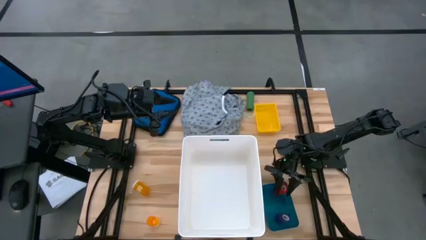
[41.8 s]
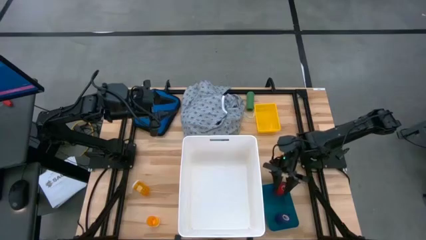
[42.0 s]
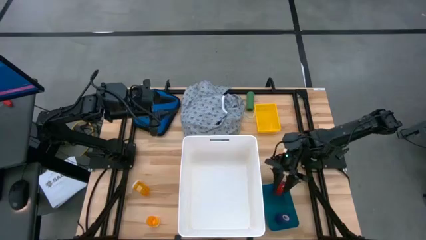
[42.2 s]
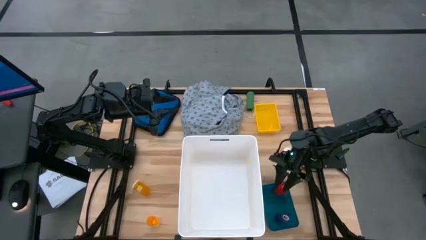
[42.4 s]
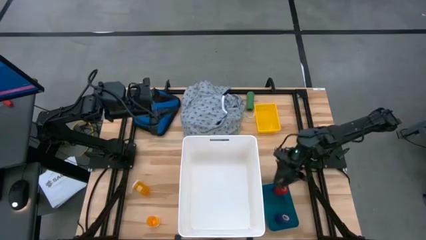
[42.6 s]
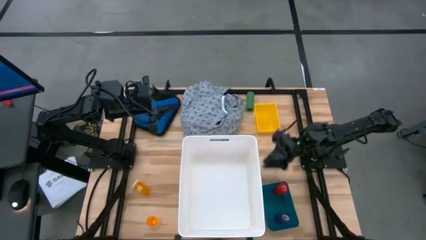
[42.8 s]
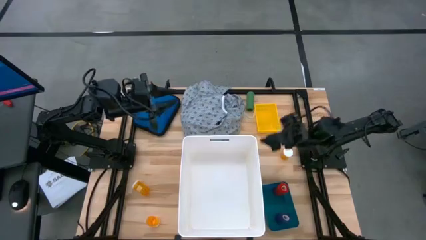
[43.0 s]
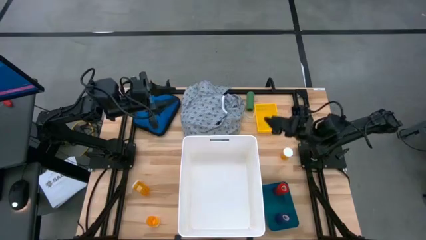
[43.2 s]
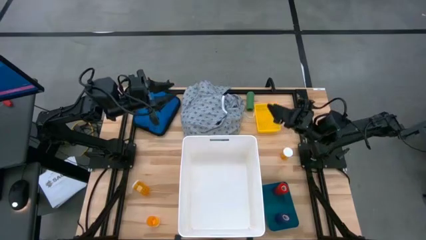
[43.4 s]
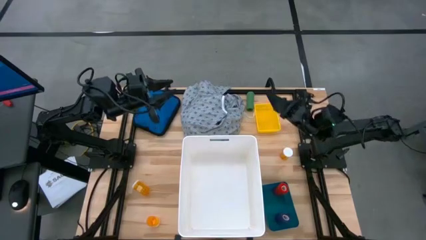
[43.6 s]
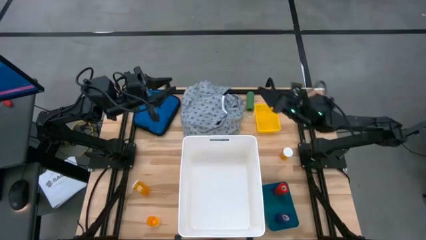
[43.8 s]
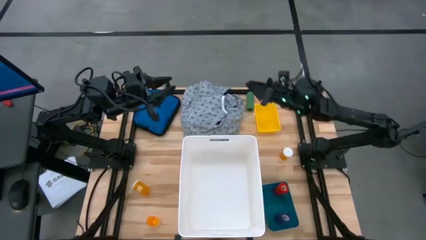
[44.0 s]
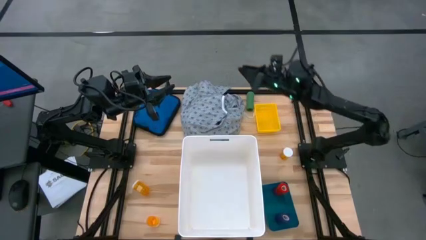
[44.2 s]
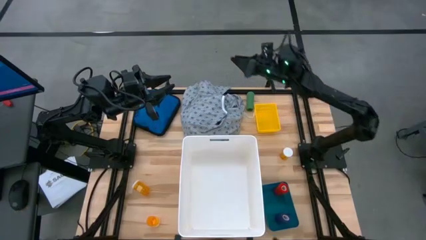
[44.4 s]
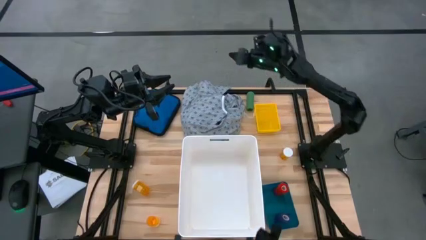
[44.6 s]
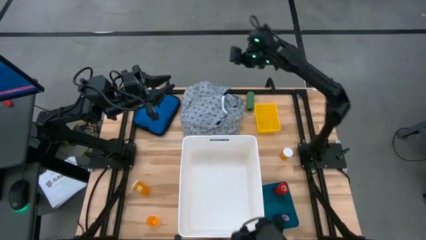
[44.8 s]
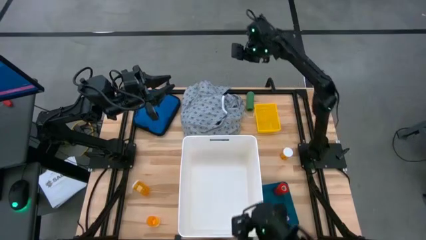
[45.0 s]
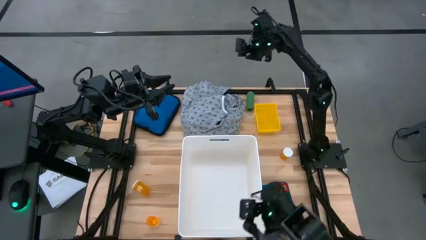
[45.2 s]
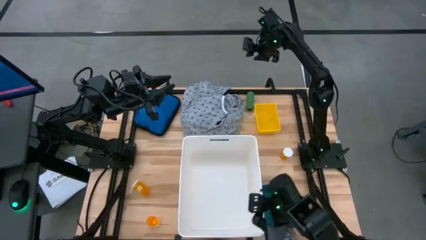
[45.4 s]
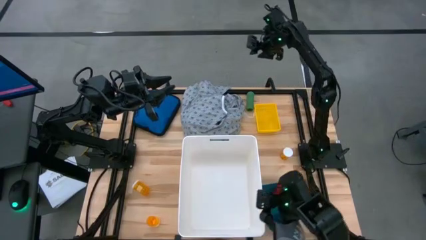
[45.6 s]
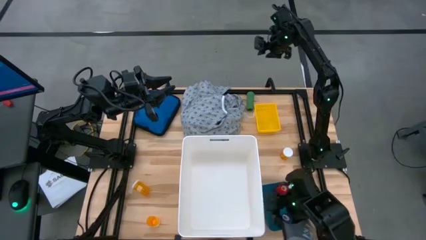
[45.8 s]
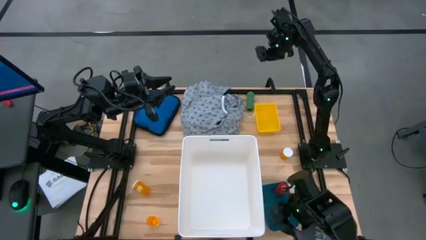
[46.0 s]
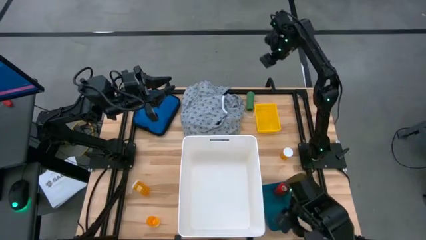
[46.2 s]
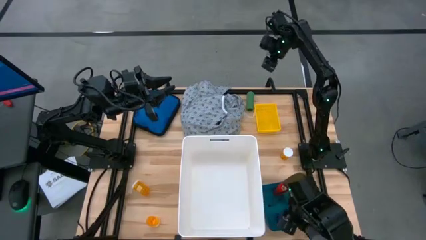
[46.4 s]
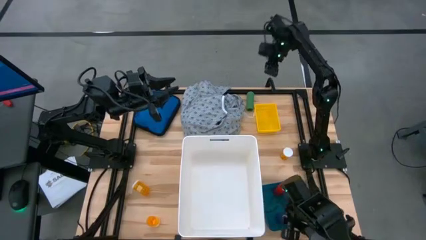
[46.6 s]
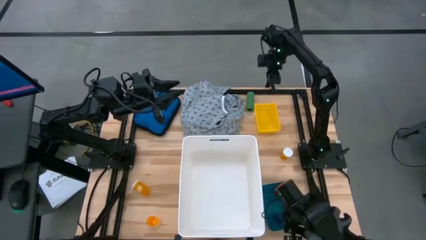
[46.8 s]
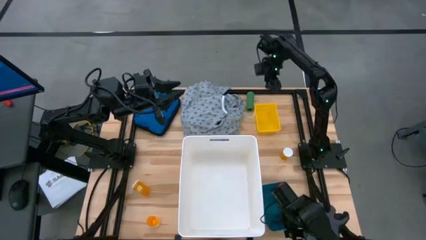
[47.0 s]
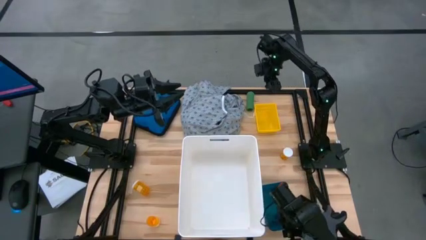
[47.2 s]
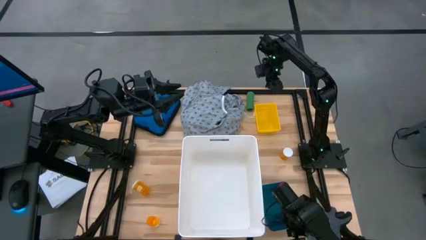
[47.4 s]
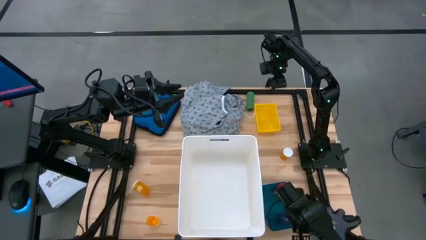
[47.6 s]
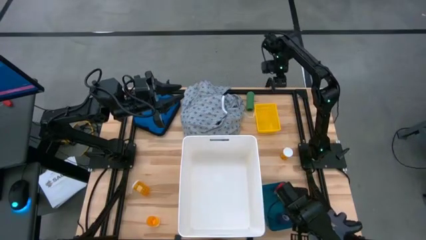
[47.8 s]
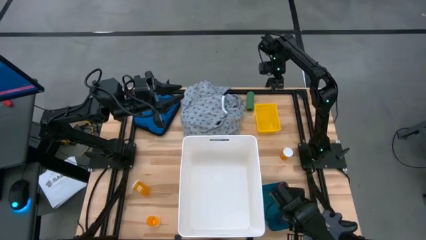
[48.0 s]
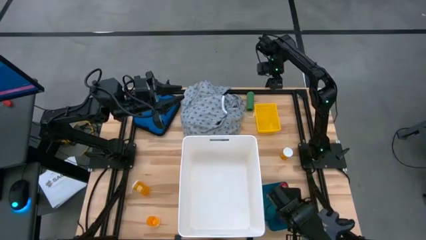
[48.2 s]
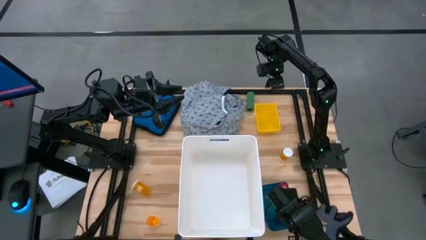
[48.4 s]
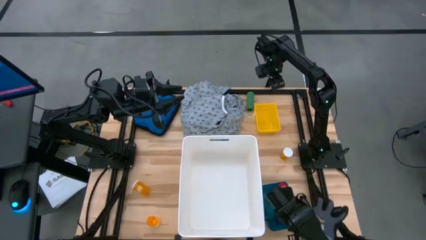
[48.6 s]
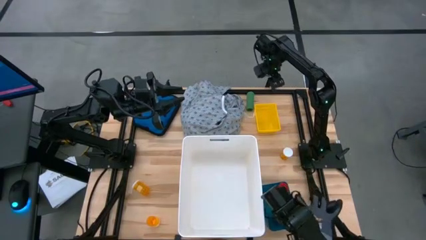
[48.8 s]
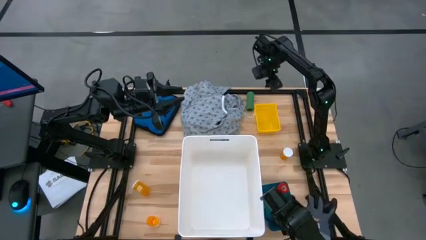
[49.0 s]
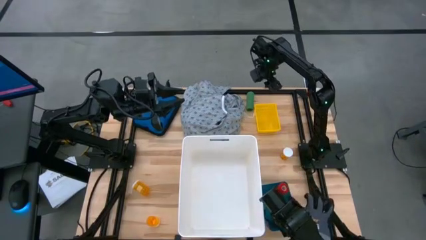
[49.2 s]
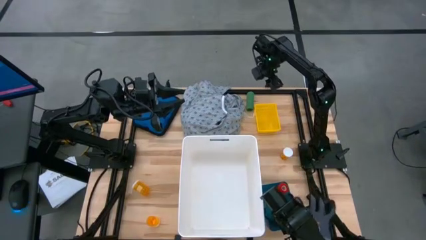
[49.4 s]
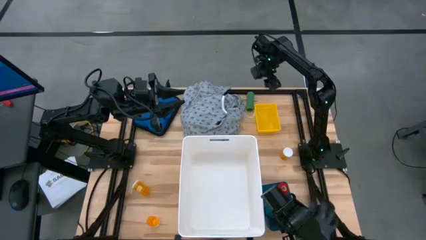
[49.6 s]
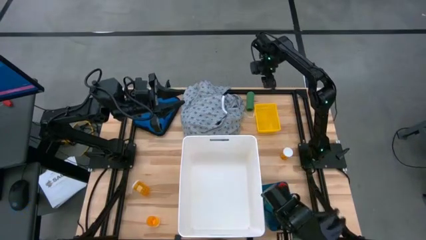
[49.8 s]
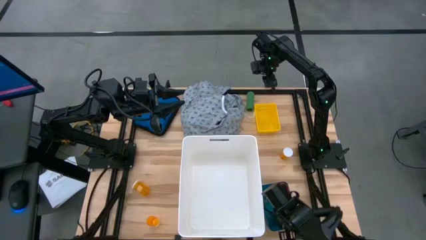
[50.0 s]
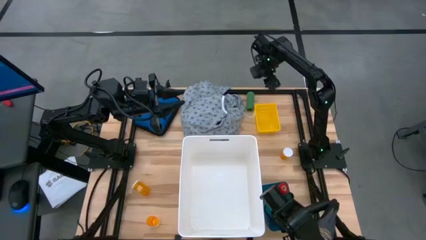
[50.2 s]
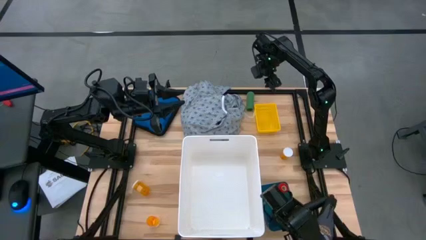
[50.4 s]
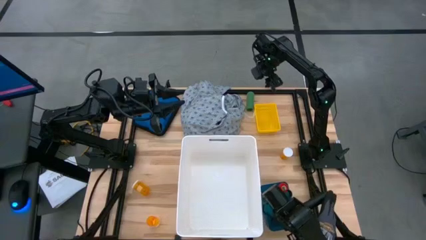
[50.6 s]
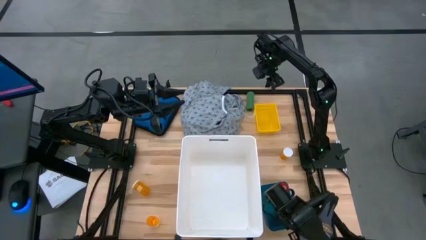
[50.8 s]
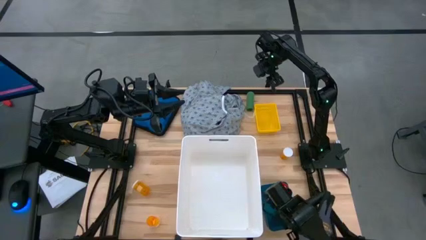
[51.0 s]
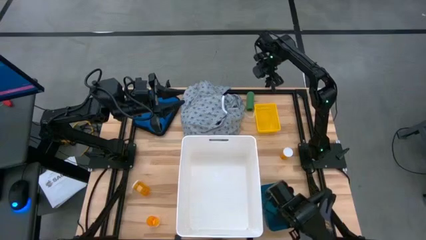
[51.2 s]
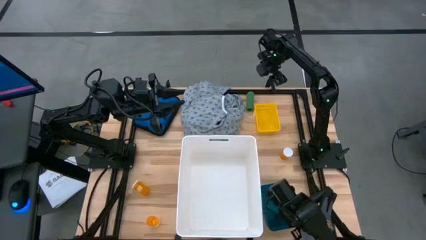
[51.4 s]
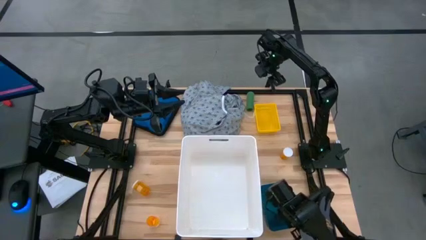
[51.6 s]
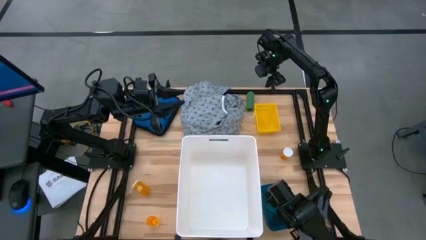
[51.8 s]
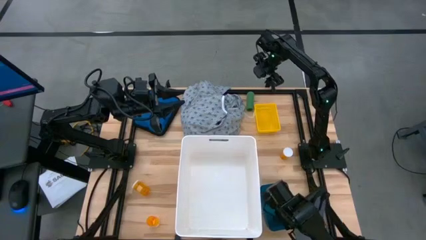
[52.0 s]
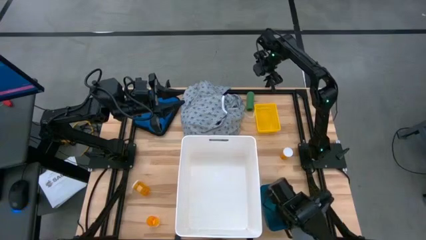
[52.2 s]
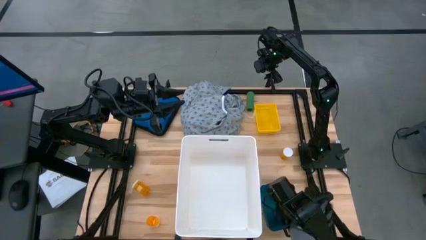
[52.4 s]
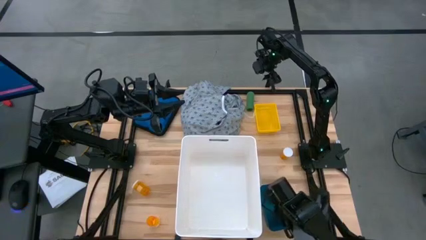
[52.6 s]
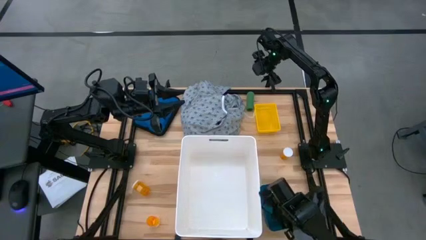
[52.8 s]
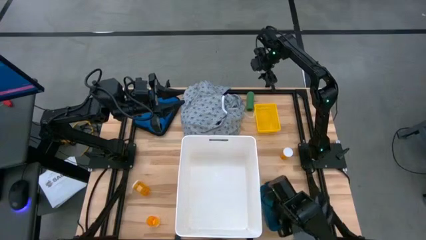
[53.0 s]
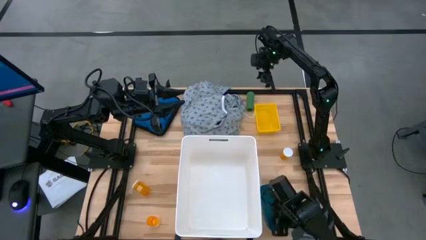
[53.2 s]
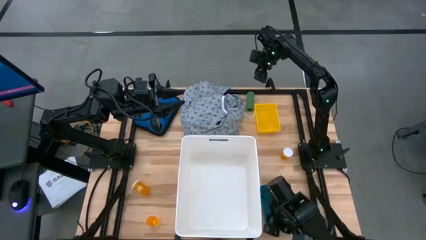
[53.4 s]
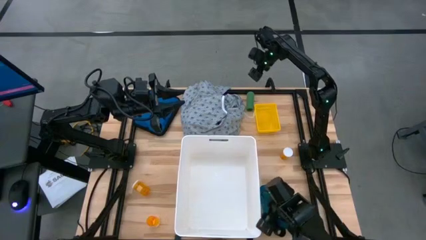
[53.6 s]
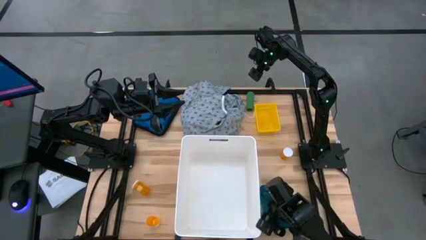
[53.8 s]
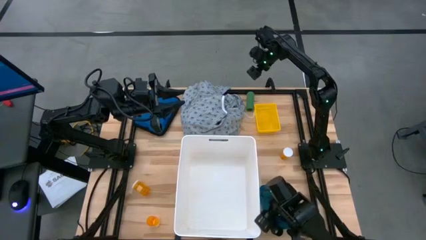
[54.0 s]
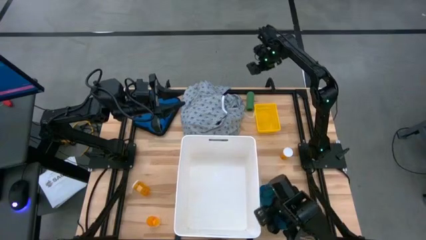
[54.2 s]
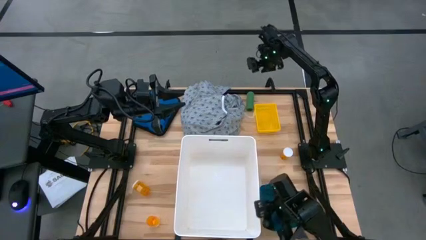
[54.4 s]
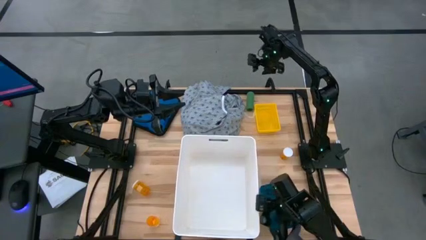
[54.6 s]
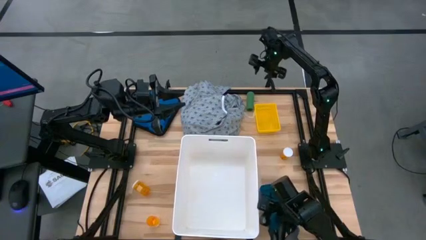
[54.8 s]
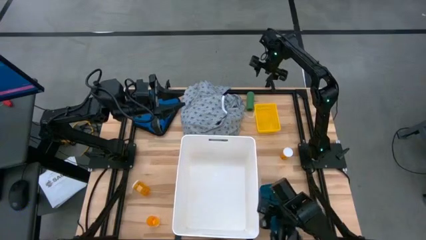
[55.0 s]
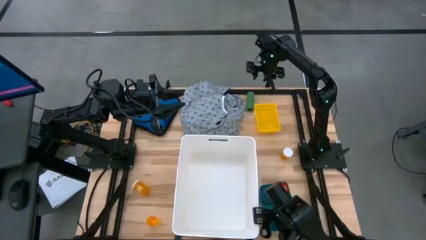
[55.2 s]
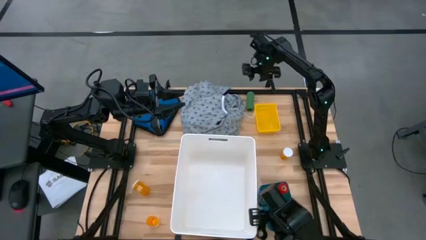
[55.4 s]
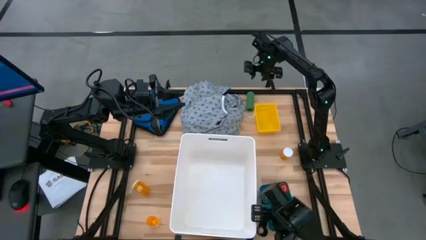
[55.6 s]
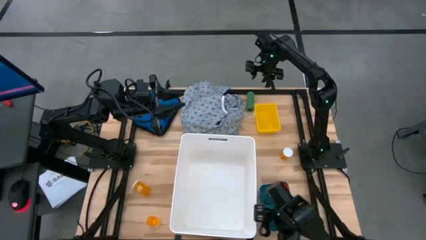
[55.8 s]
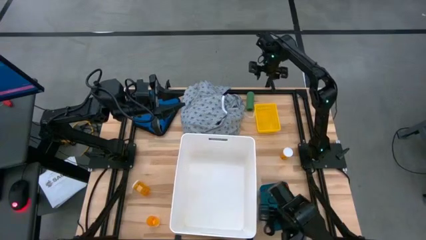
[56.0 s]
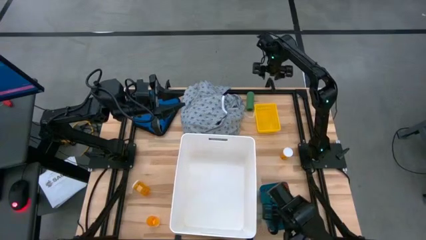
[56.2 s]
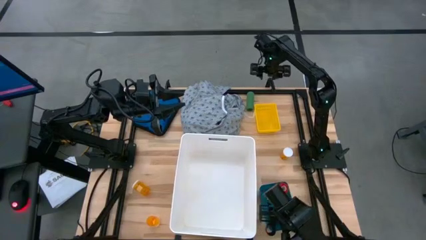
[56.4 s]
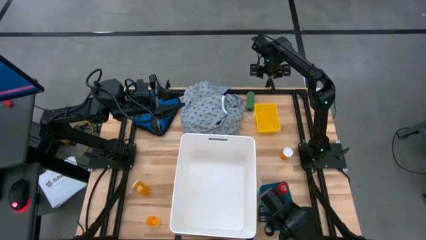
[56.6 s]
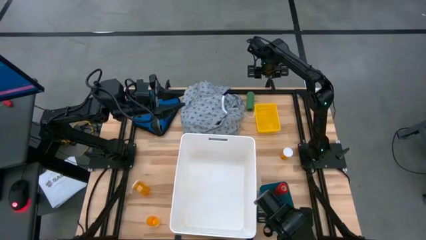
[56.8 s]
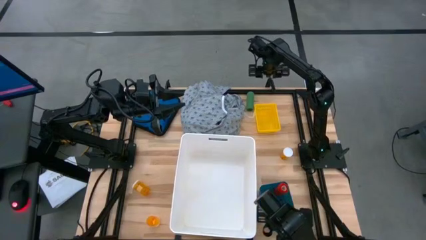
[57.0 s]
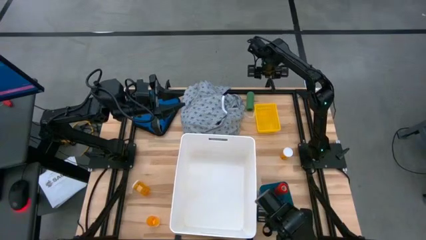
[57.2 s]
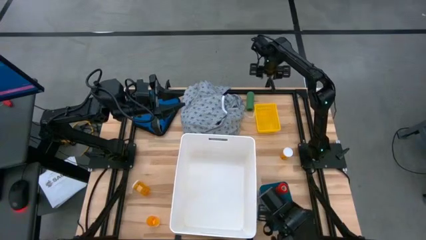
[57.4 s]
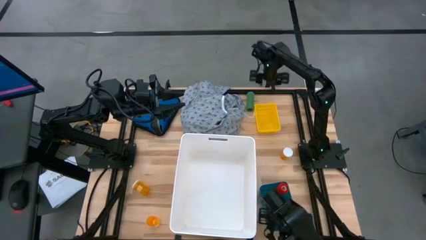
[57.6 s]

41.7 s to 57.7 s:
Task: Pick & place medical supplies in basket/bin
Put the green bandage into the blue bin

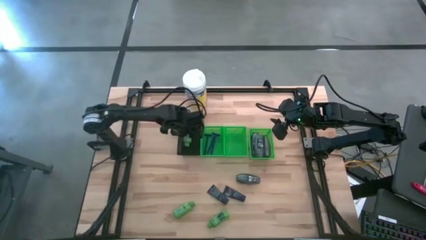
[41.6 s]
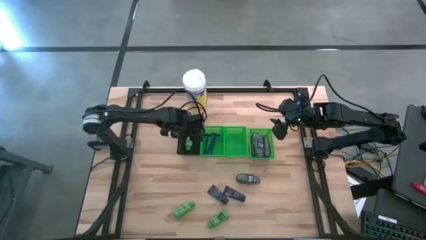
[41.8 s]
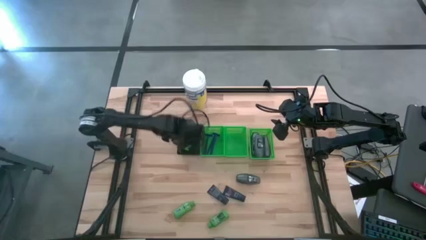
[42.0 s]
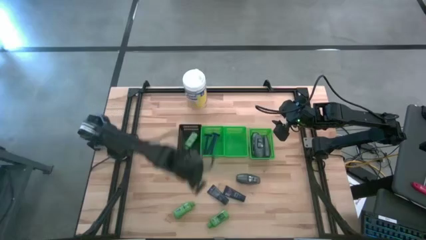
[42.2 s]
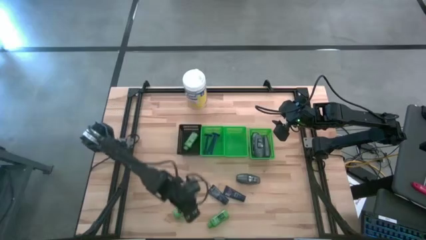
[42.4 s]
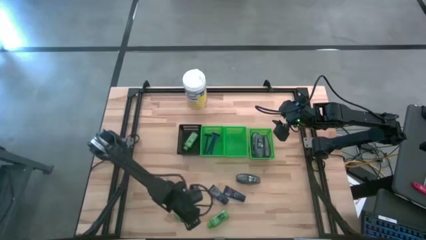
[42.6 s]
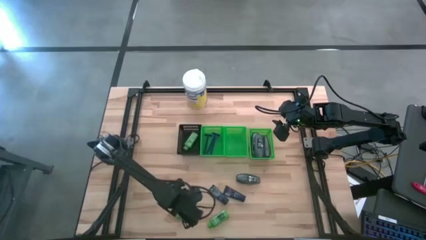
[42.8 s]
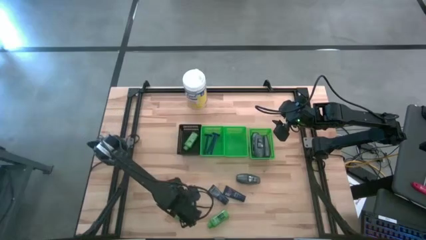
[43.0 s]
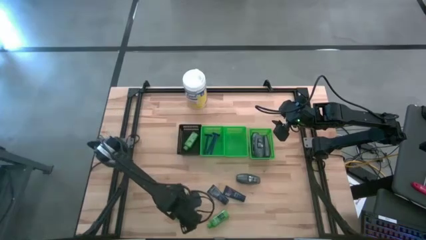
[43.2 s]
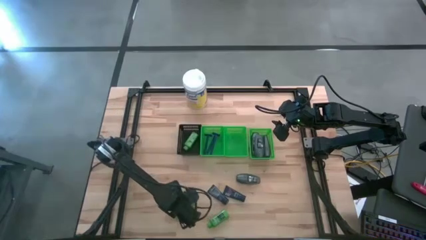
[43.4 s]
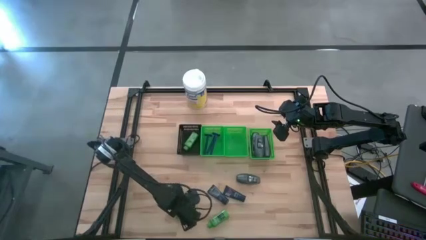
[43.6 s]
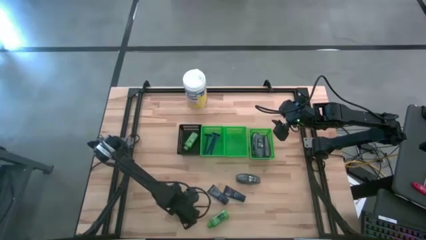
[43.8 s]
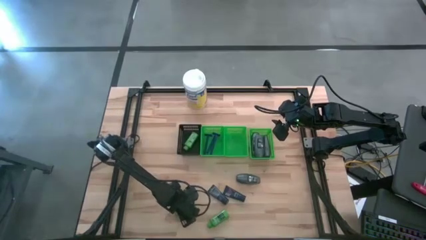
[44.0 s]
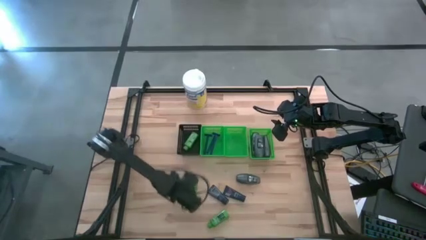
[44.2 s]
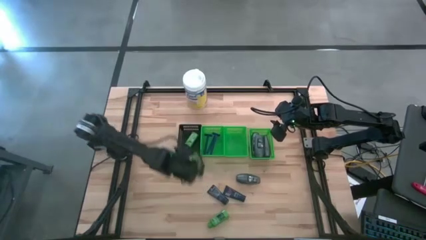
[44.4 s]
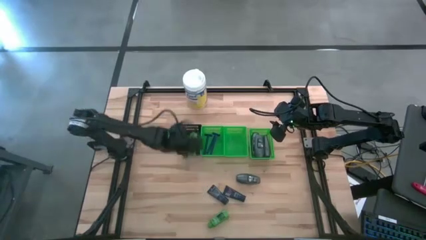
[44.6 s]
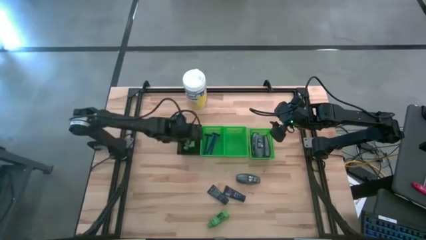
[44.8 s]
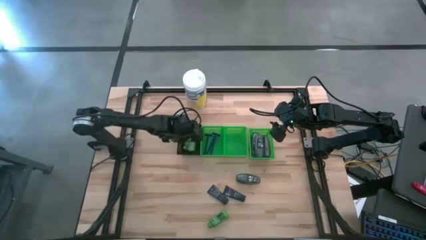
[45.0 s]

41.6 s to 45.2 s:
Task: Pick & Place Travel size toiletries
Put the shampoo into the black bin
